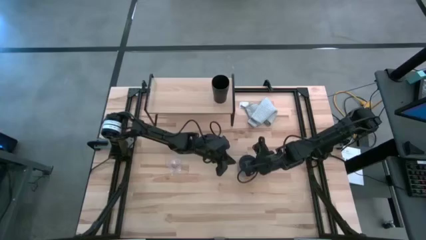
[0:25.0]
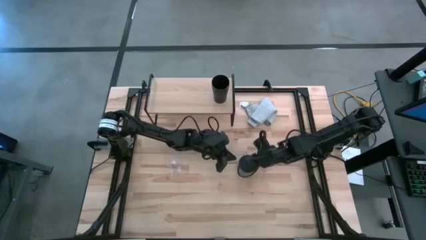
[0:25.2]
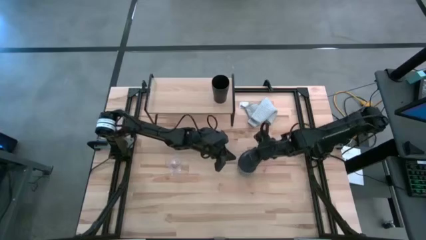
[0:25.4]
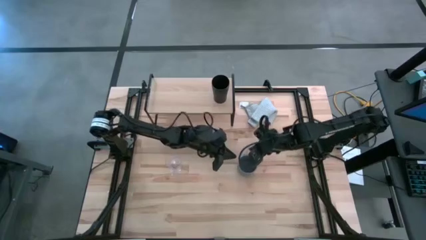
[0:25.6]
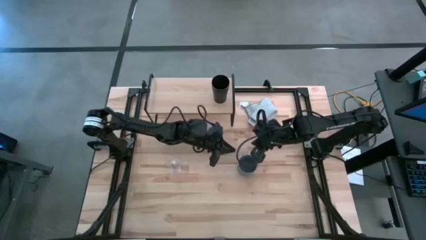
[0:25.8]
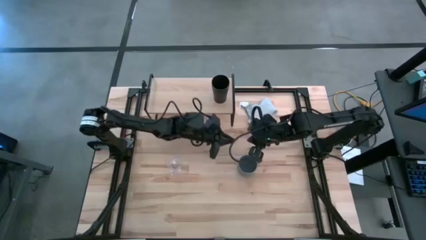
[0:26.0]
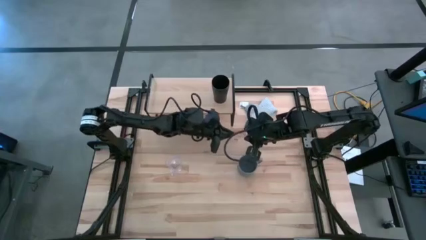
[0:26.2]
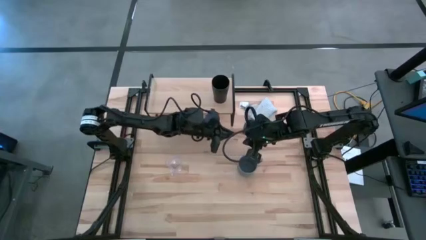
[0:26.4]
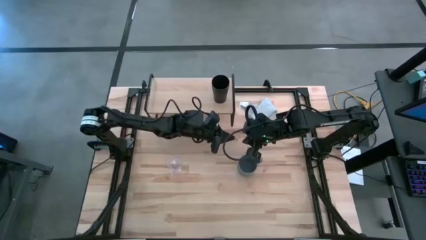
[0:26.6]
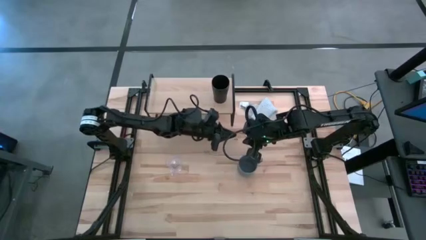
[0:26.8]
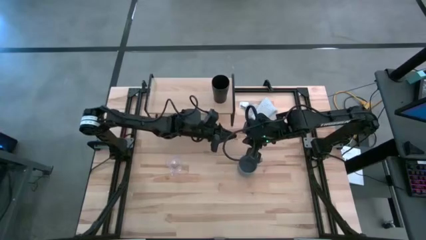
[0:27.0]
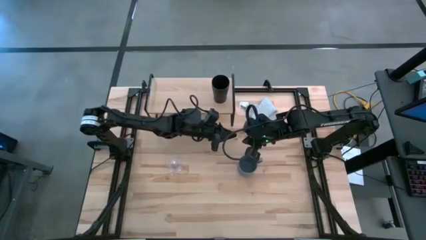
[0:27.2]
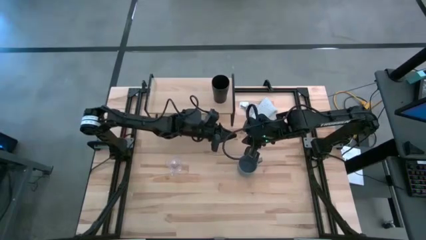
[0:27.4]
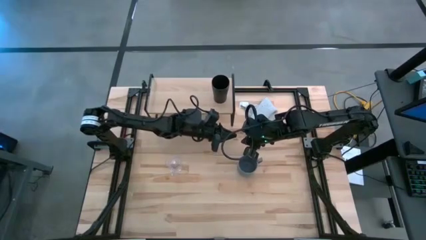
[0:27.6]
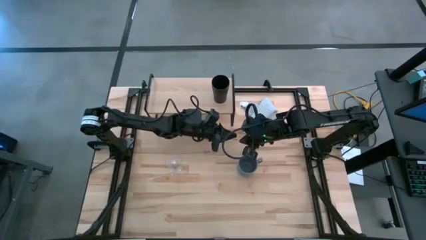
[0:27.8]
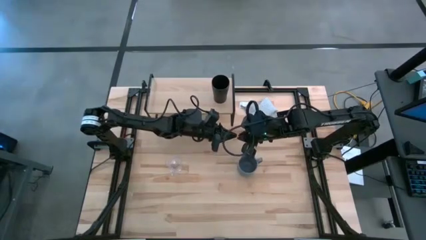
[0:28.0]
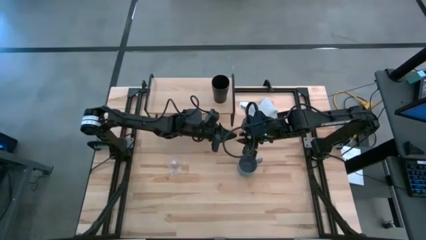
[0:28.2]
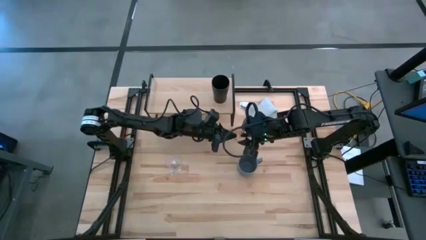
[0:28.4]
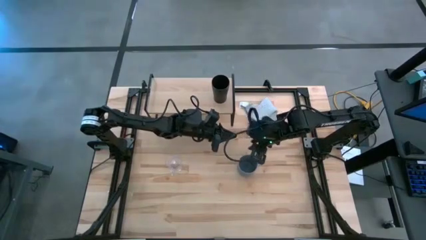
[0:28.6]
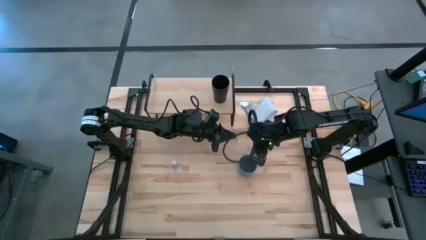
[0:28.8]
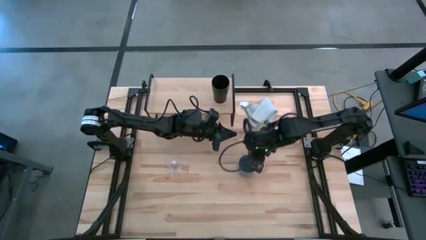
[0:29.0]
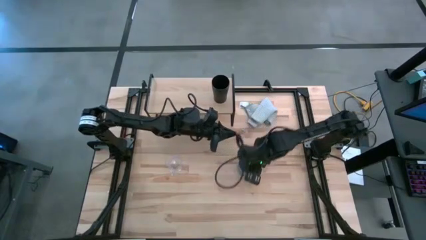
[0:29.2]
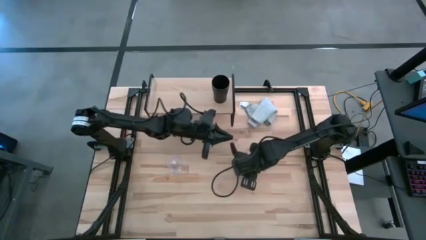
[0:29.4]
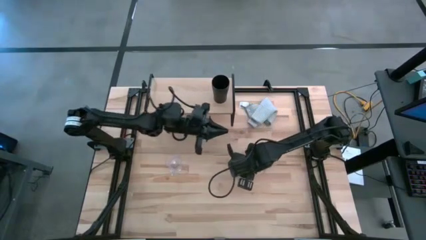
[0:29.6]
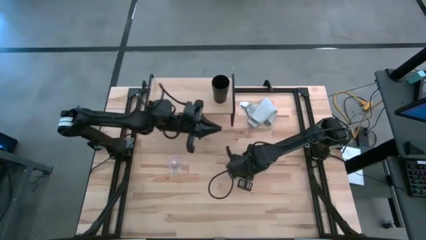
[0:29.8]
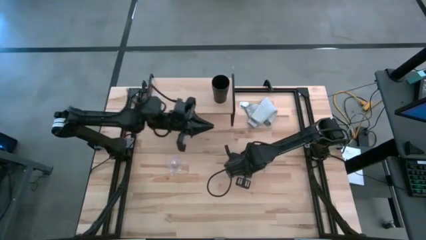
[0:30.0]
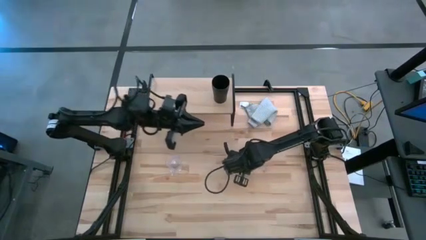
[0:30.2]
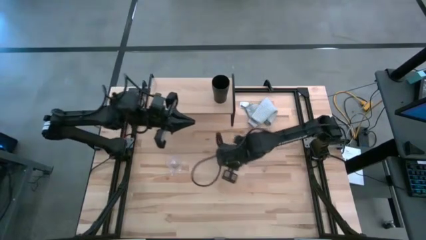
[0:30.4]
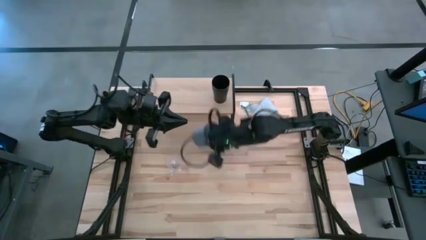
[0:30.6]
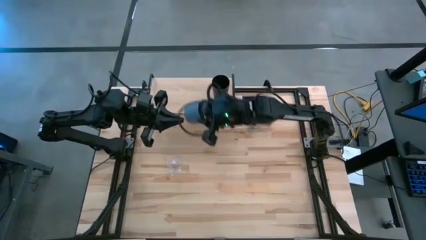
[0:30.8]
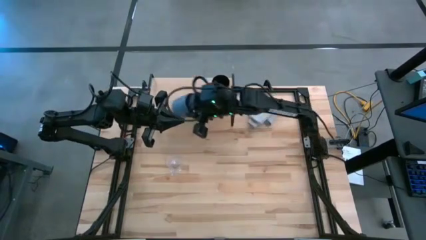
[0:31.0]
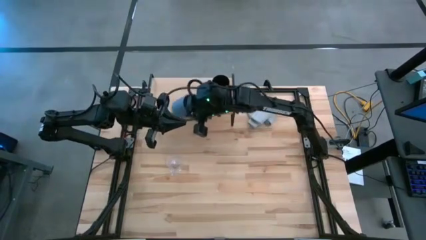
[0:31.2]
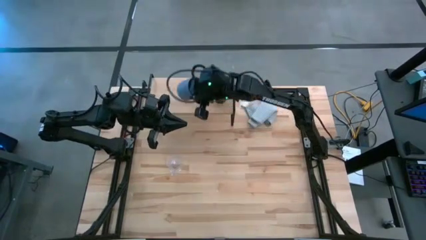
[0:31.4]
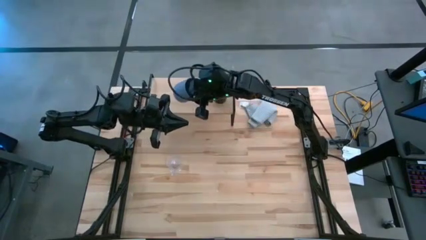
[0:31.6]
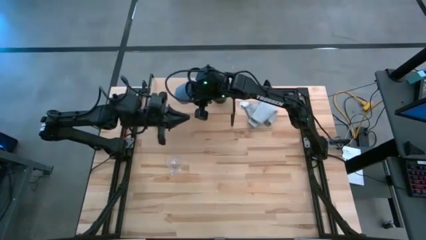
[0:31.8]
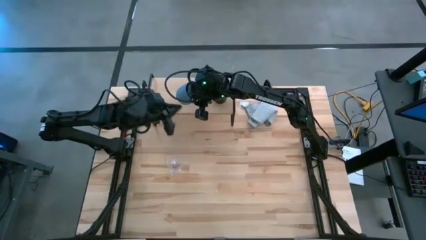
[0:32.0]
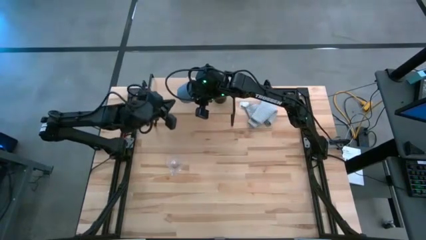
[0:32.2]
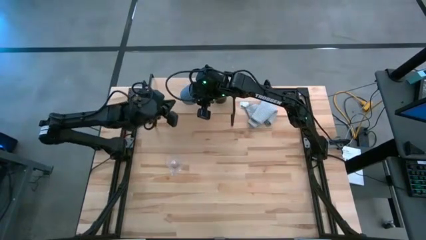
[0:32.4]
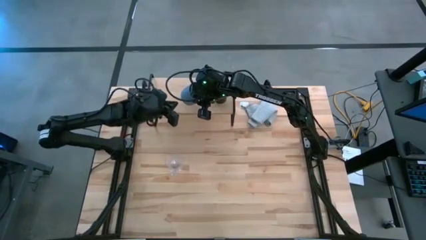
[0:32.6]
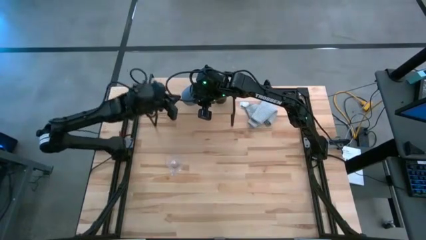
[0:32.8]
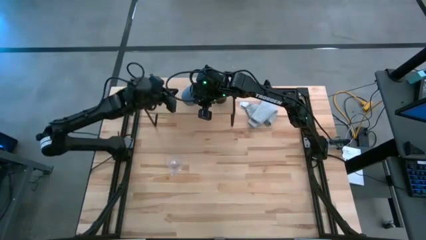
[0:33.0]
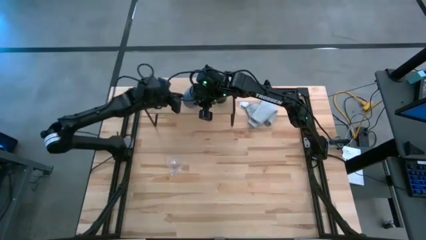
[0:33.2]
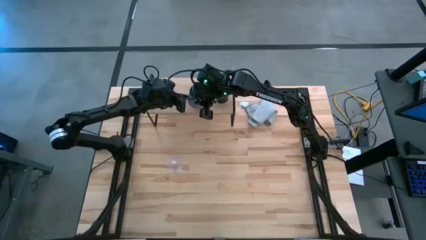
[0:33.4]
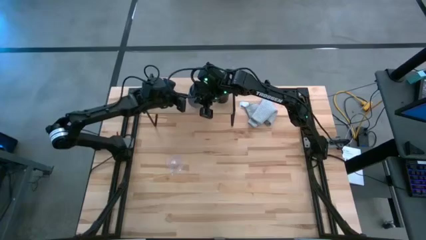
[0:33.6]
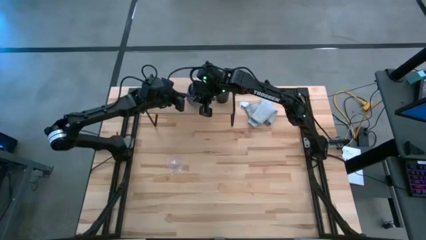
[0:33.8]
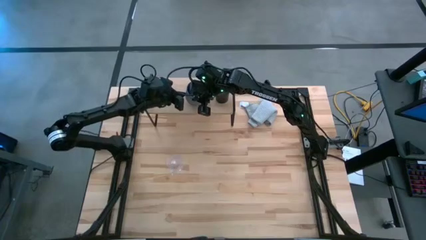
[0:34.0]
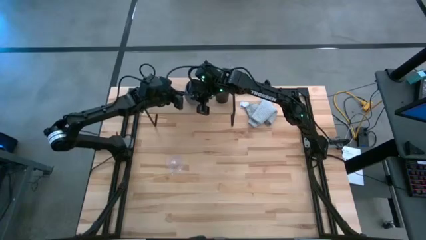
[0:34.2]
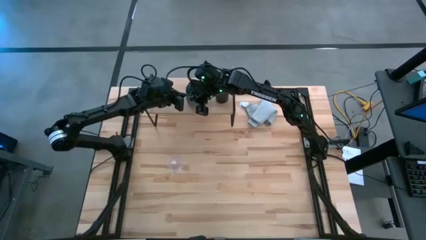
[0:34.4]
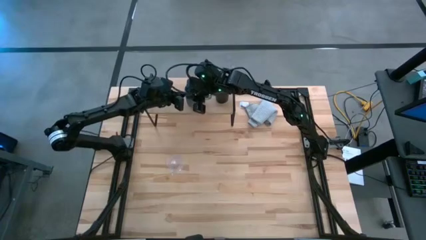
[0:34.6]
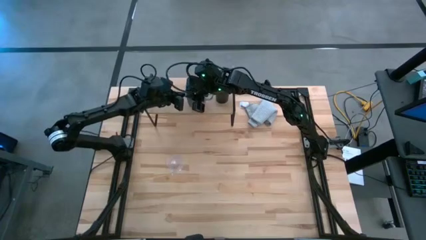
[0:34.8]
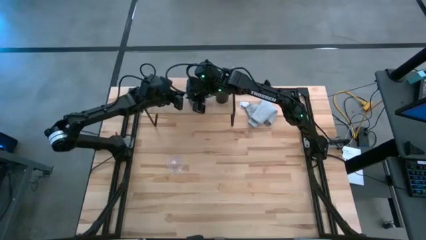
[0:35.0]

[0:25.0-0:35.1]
Task: Stack small to large cups/mugs on shelf
Put the blue mug on the shelf

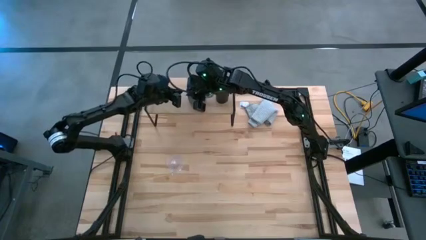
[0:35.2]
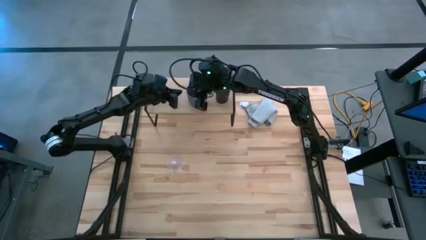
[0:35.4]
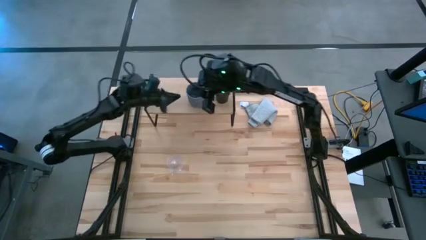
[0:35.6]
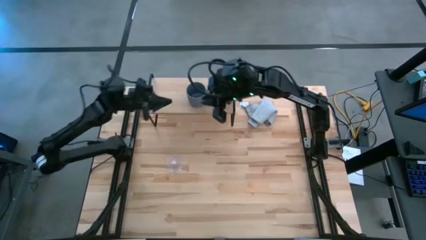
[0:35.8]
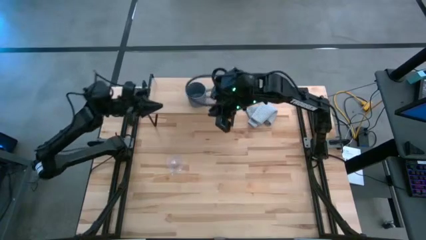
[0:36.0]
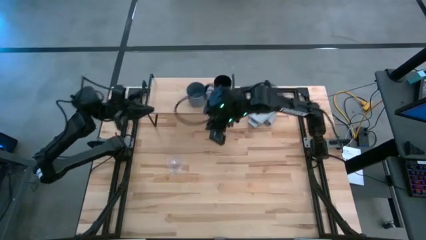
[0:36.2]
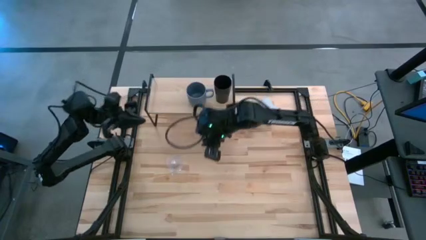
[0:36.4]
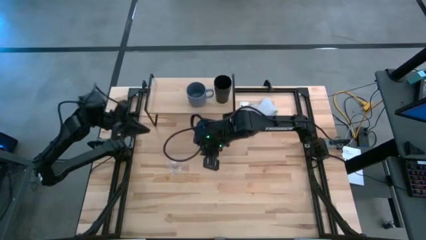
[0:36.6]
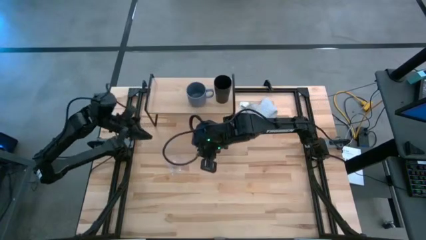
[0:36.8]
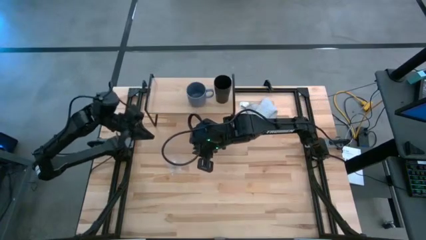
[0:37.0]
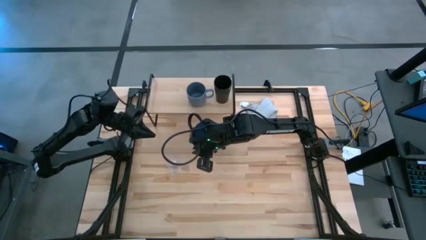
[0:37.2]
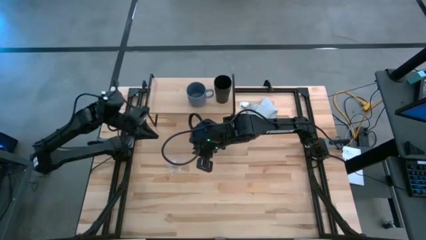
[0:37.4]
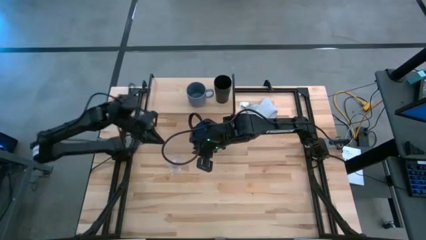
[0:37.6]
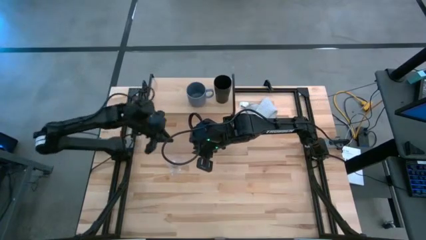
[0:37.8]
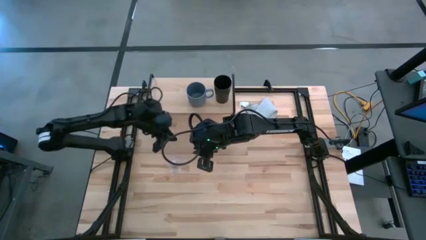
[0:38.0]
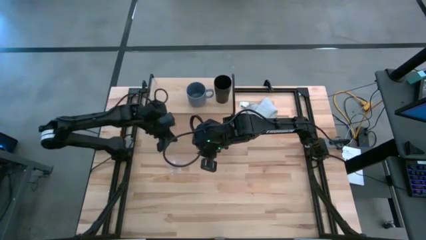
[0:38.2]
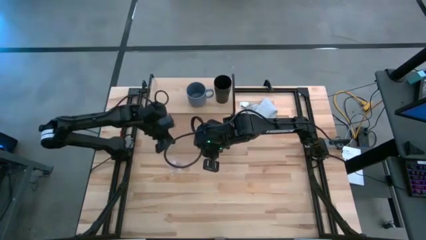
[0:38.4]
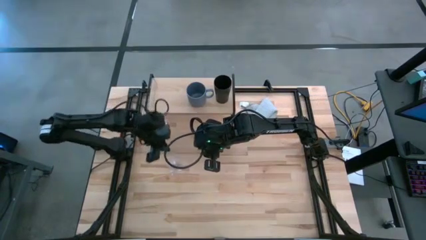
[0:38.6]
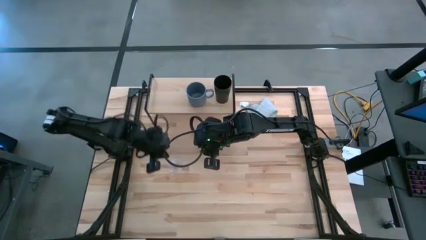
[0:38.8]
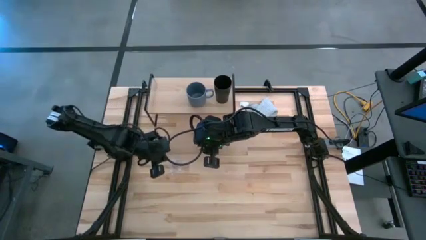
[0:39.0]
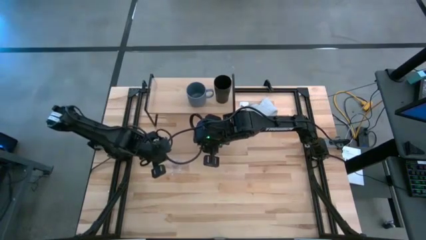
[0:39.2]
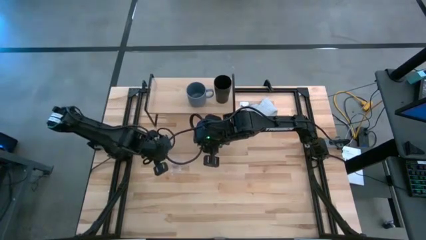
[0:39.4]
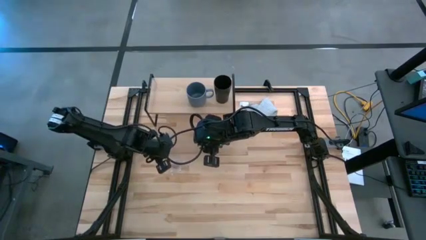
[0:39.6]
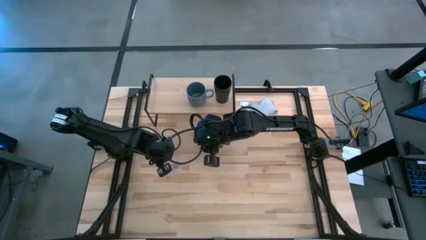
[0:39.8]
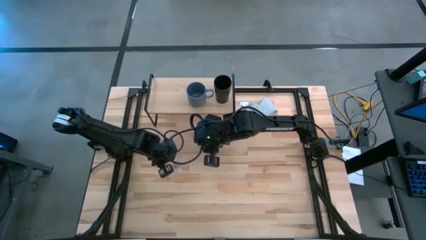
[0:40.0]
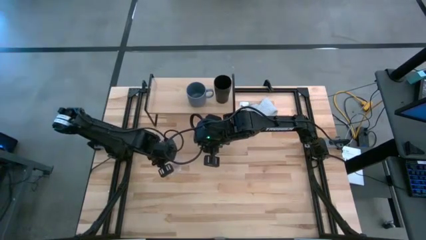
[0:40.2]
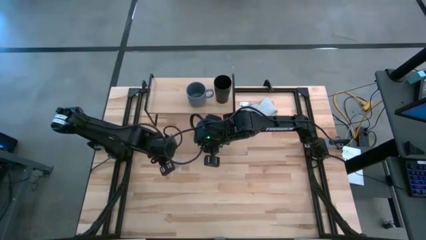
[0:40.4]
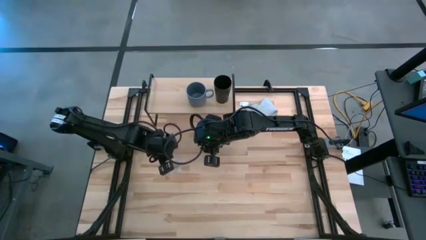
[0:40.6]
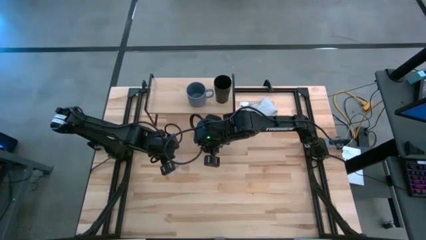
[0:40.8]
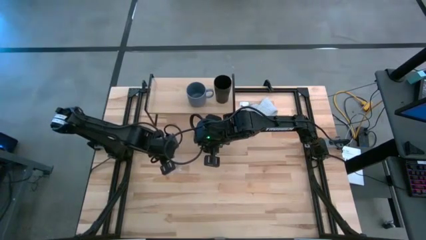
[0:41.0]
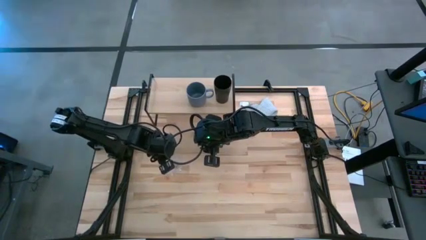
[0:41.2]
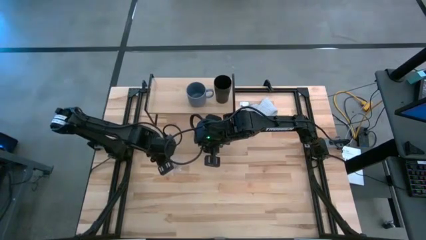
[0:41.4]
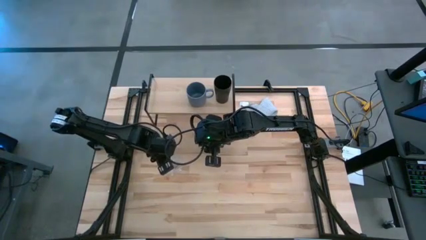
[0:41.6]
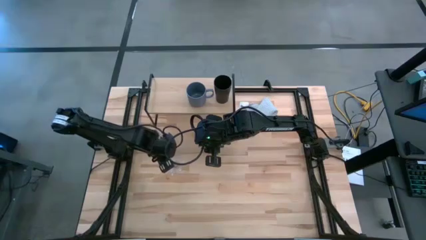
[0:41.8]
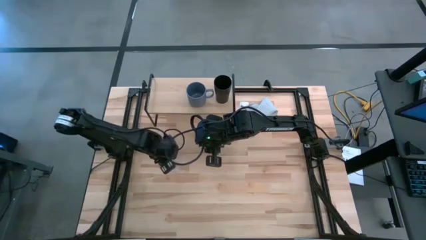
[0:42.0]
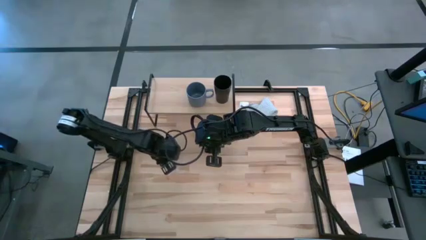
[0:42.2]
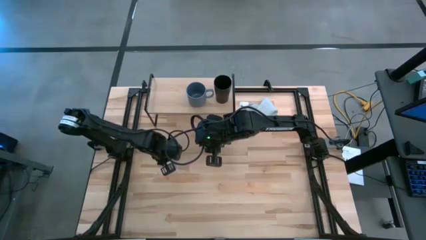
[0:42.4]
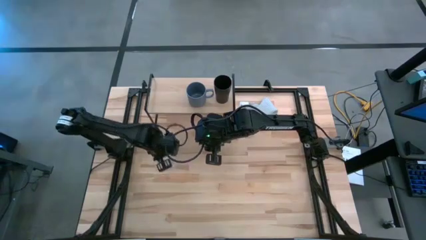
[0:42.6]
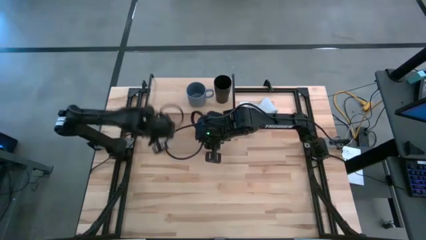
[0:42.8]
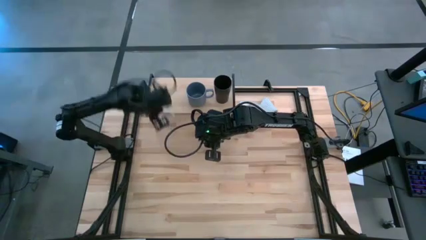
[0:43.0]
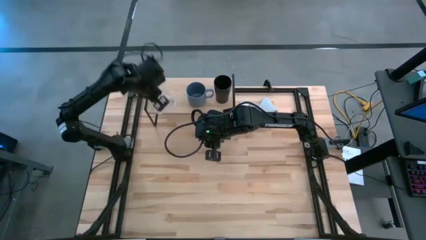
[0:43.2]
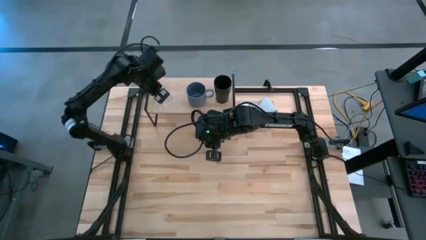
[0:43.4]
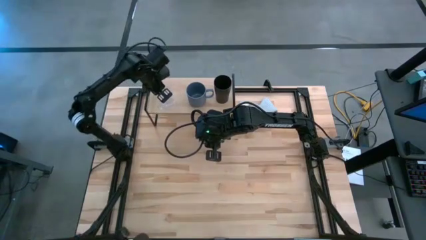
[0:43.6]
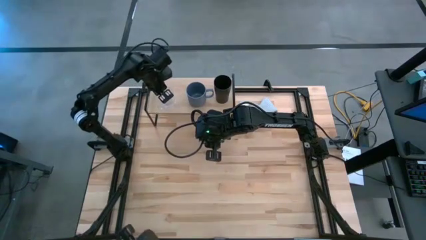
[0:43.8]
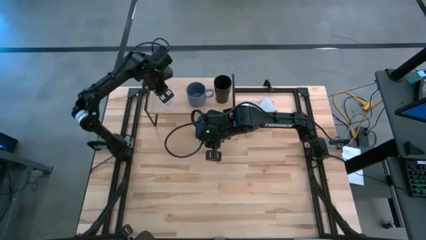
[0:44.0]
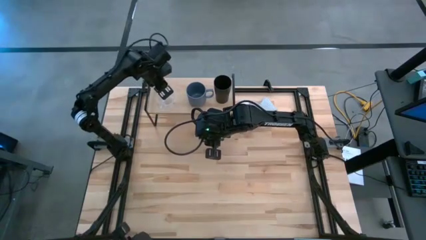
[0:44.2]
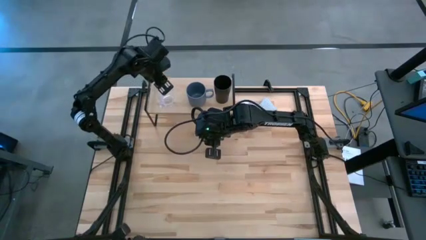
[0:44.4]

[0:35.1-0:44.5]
Put the transparent mug on the shelf
